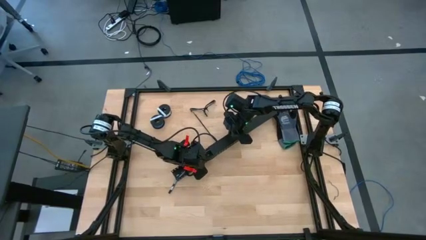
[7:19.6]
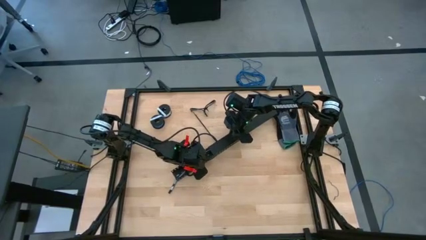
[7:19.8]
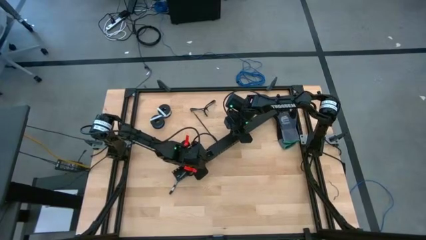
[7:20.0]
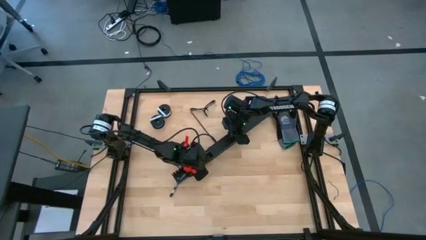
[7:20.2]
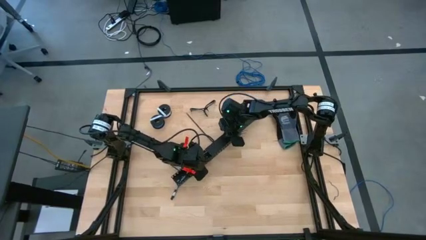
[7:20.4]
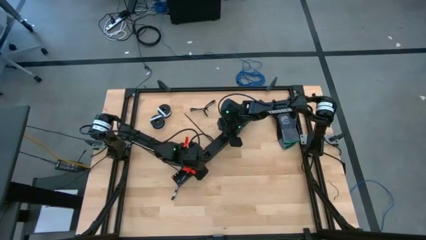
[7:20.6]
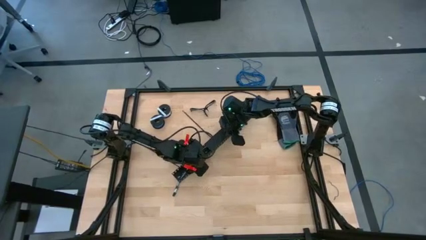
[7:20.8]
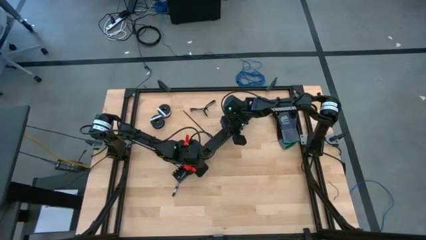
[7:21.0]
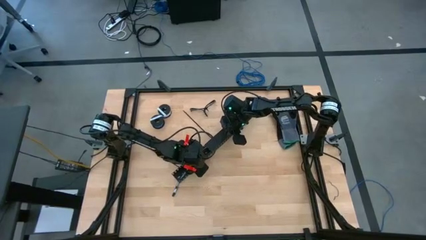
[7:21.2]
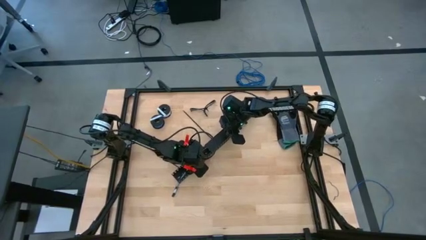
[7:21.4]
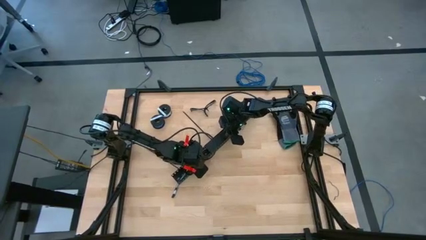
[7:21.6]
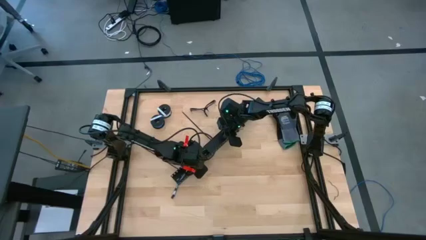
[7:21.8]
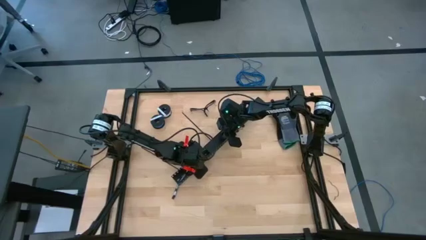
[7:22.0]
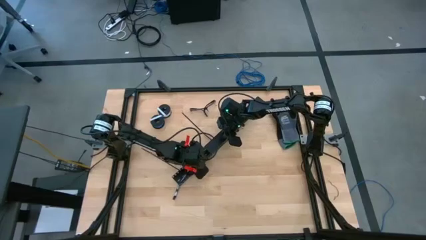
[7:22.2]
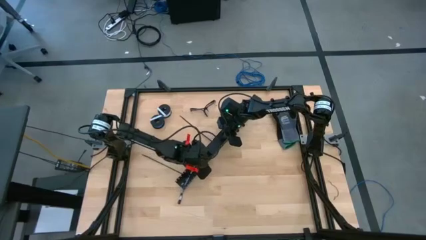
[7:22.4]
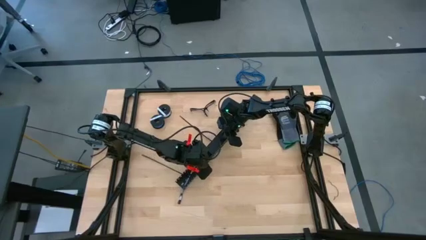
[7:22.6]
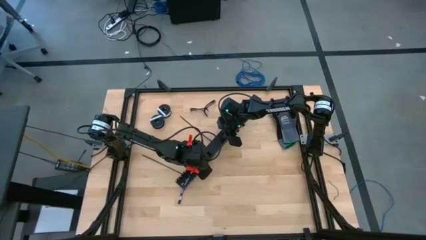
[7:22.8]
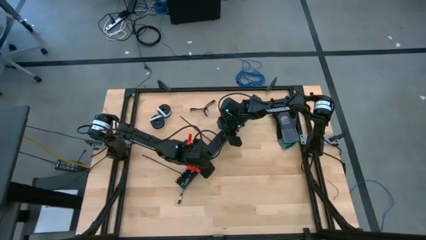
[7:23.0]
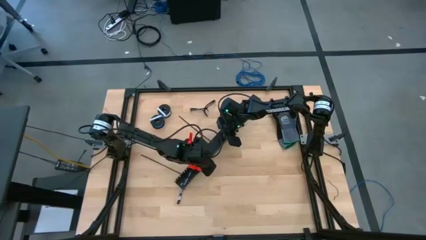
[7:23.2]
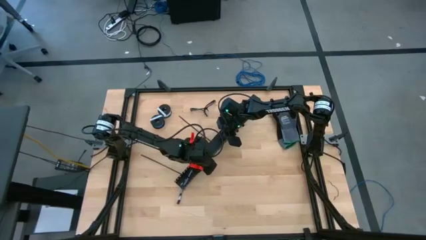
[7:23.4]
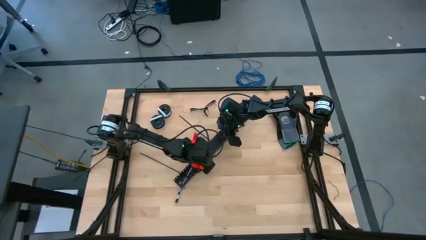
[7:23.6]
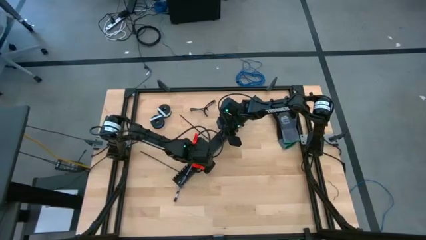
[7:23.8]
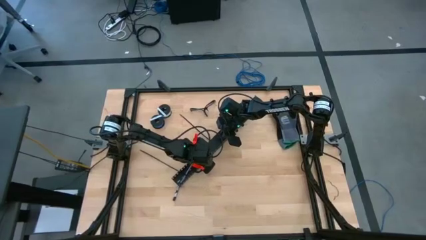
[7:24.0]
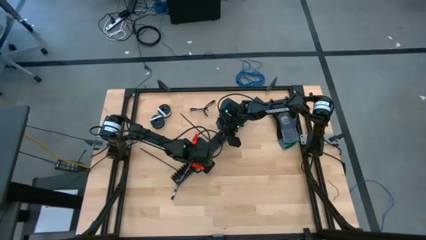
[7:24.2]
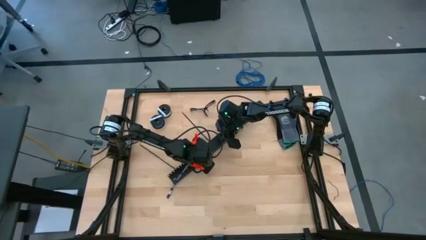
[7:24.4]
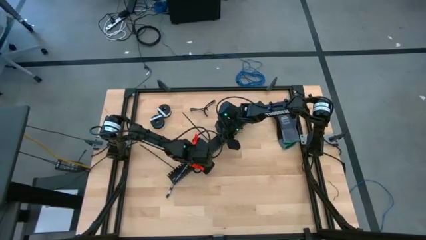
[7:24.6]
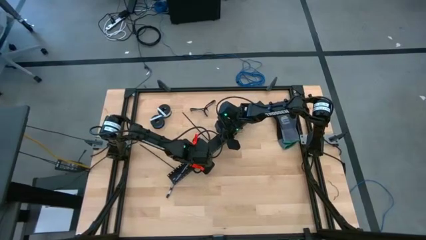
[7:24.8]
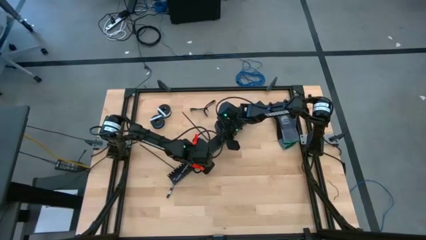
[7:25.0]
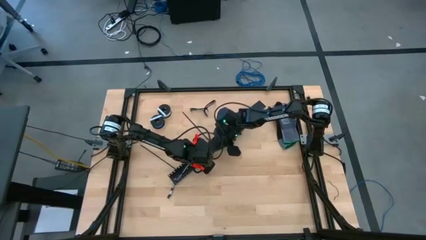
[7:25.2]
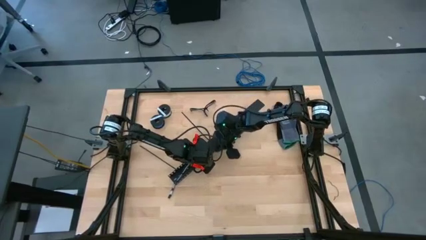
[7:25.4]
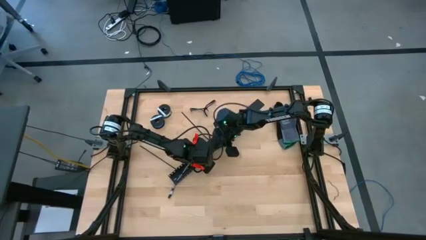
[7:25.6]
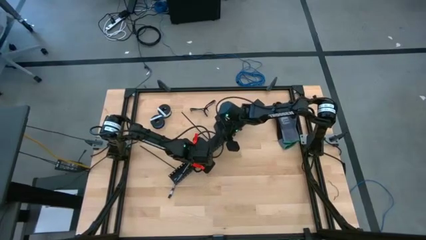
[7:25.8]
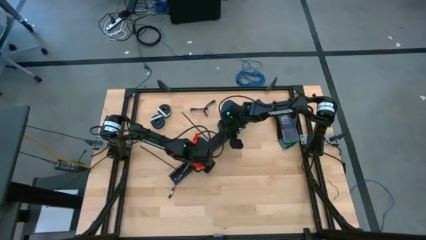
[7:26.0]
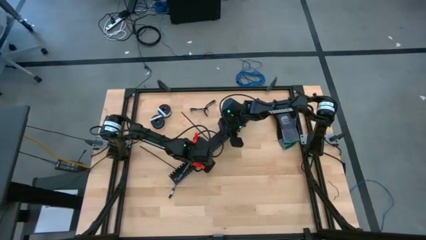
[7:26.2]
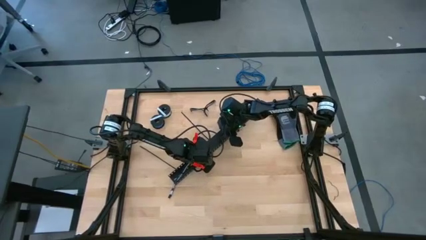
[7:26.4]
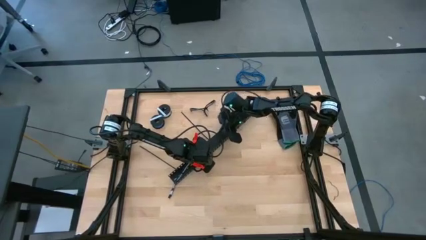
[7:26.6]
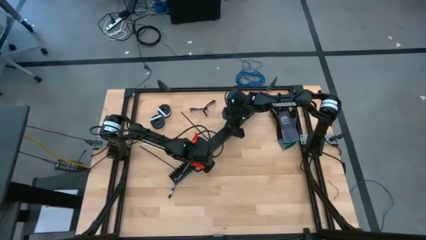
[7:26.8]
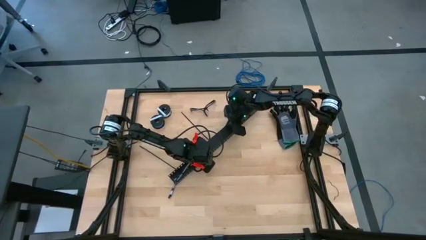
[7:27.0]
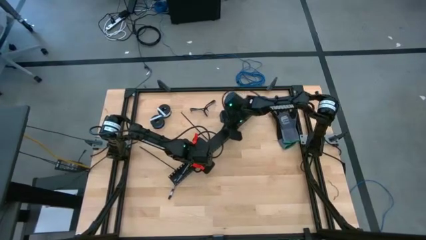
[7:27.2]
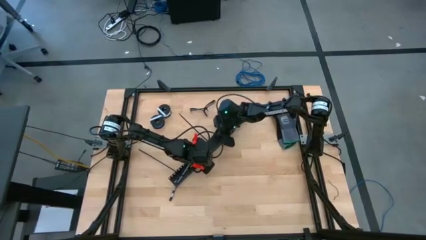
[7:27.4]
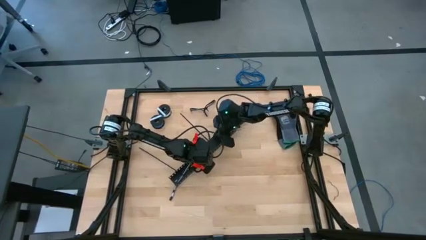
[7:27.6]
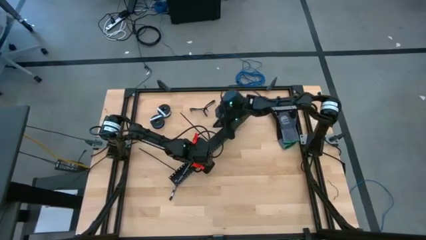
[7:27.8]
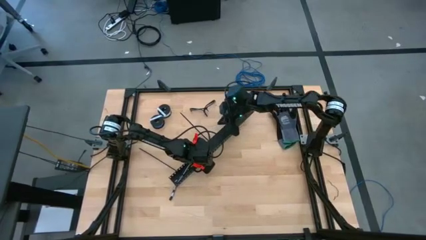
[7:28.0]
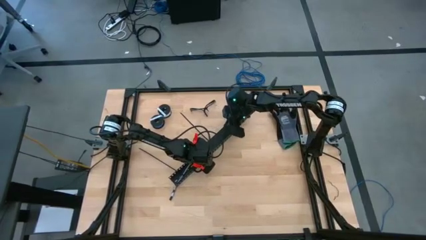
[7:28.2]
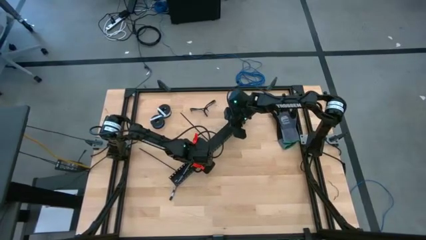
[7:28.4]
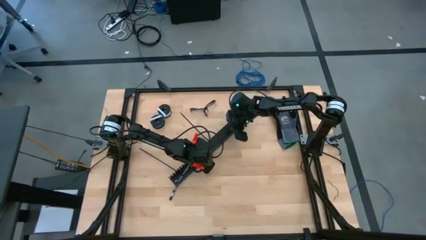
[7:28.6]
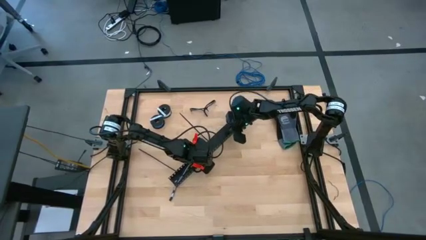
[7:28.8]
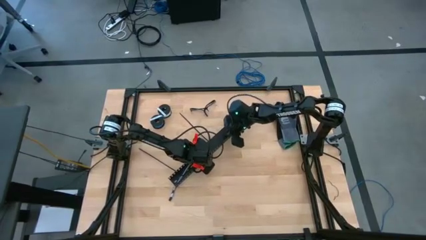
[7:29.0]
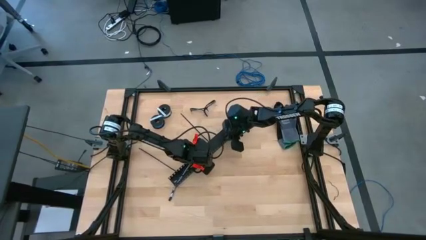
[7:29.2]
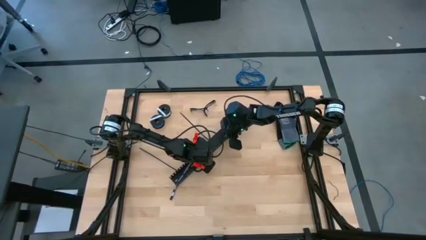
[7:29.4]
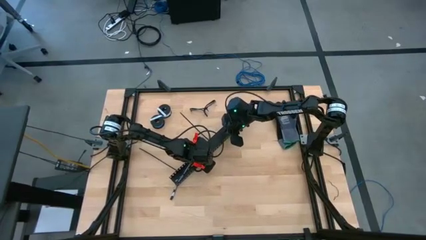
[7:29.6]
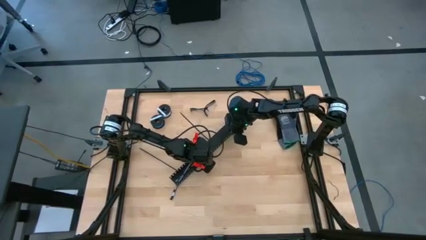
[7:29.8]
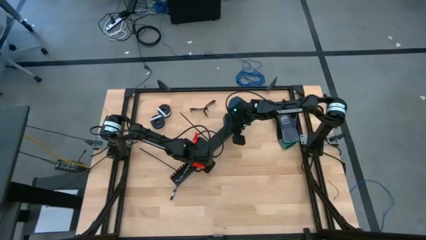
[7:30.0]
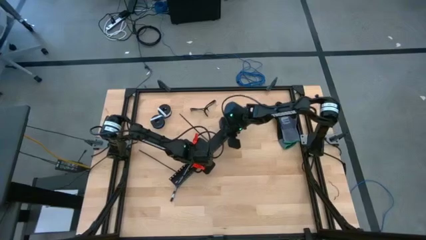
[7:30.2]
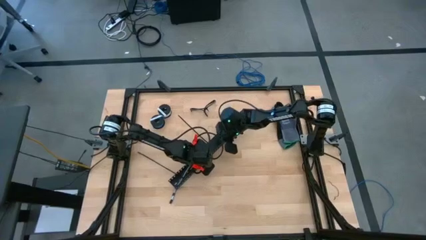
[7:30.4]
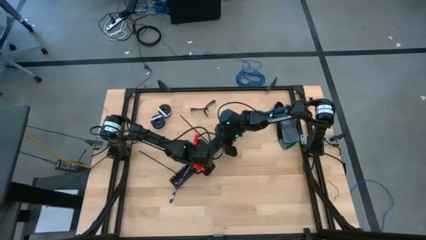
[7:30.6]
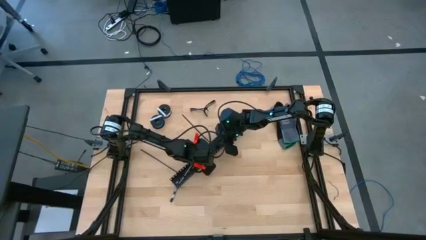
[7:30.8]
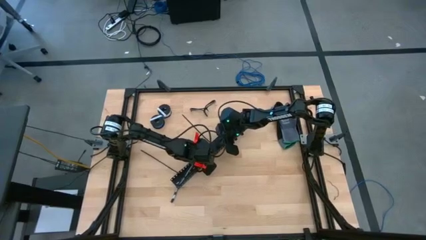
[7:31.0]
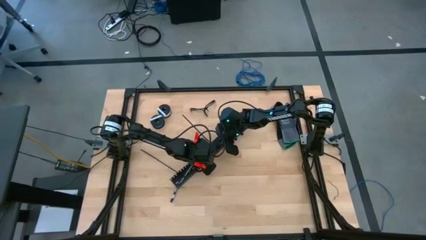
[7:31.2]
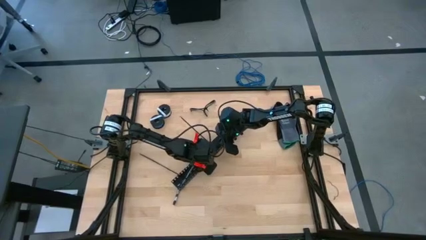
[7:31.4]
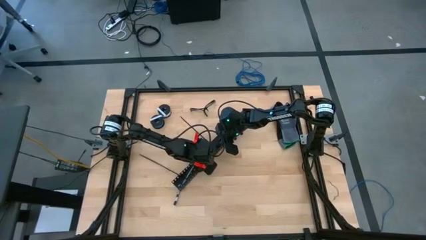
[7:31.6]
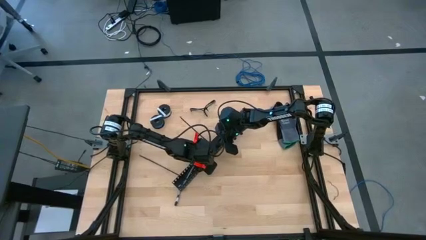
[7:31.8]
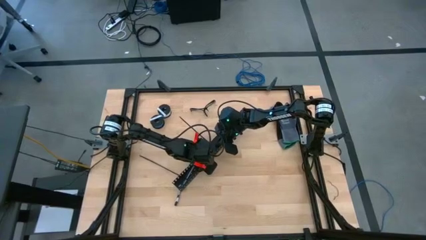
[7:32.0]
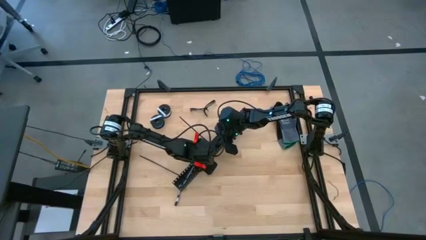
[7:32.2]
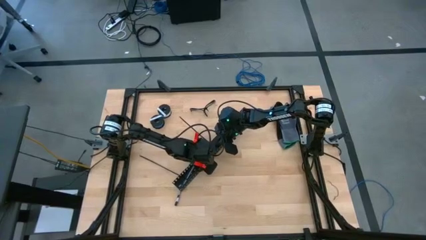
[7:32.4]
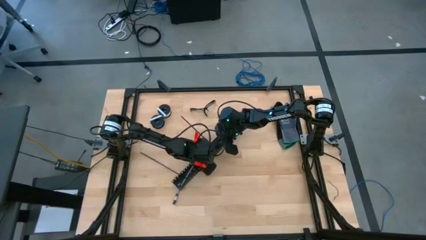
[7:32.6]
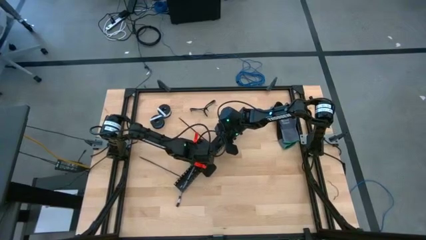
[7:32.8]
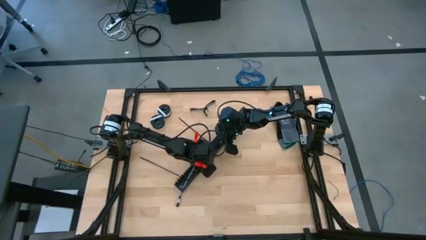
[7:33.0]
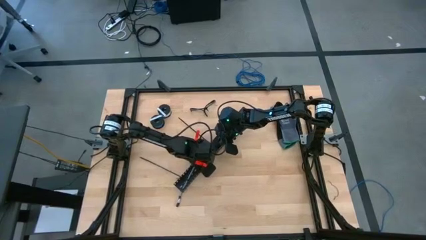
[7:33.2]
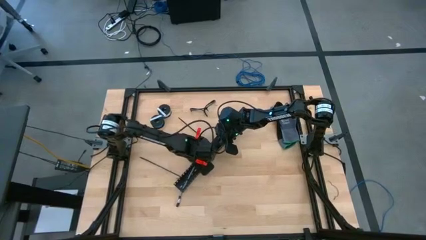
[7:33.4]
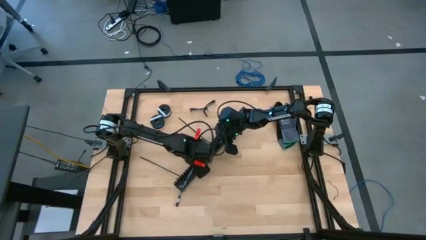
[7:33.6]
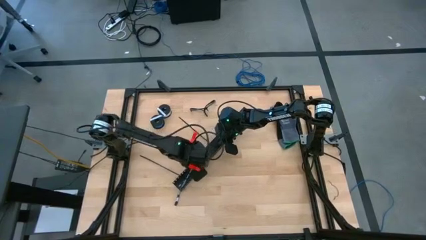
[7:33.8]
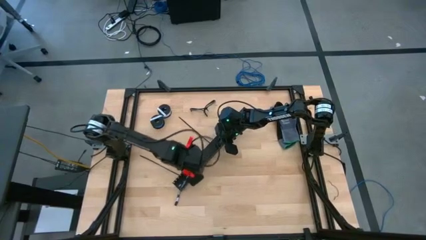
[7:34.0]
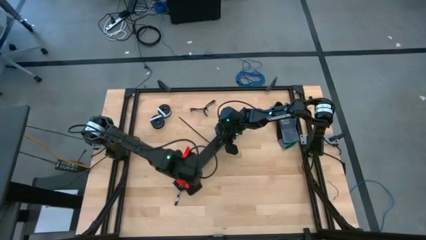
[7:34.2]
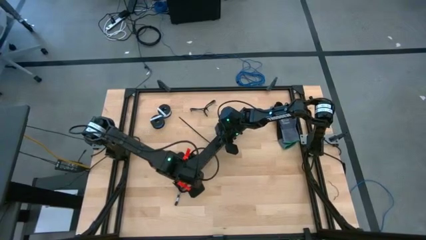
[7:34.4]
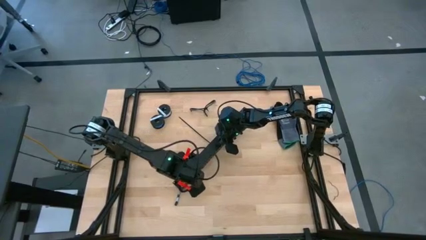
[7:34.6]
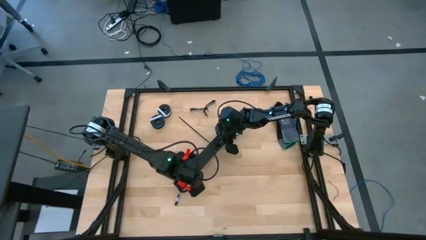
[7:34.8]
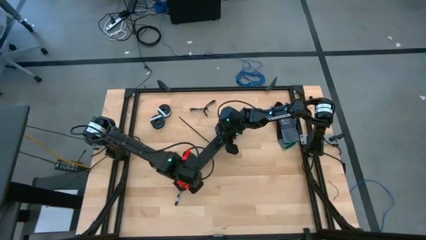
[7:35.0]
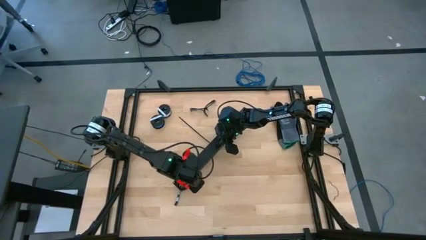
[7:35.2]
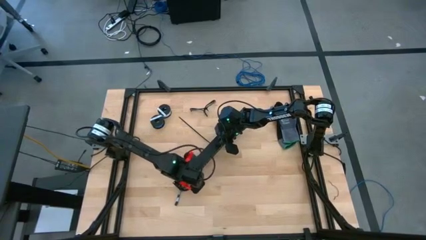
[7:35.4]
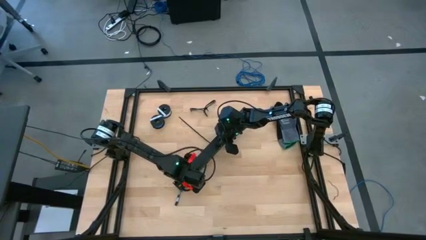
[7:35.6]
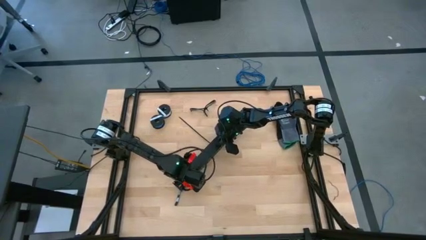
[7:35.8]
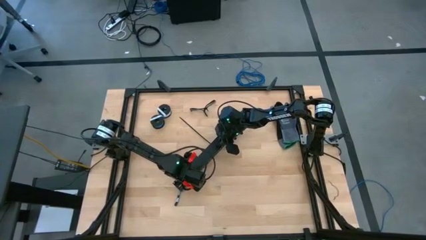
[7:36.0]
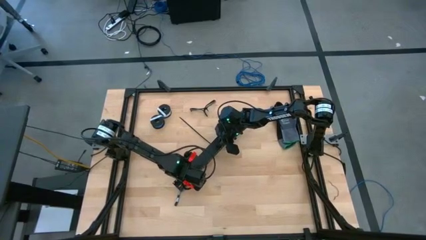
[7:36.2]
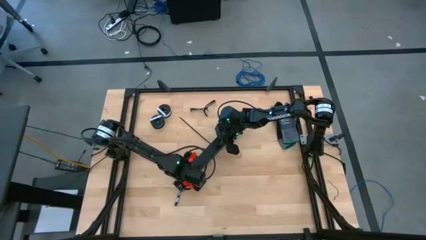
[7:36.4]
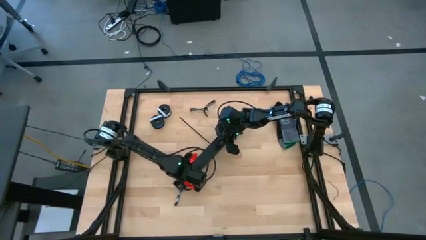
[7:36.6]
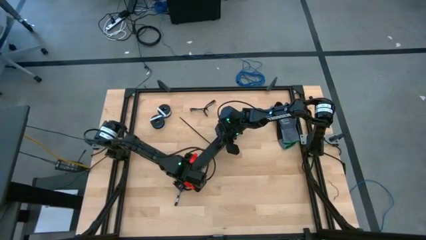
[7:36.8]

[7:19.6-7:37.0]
Task: Ziptie cables
Insert the black cover of the black cable duct
